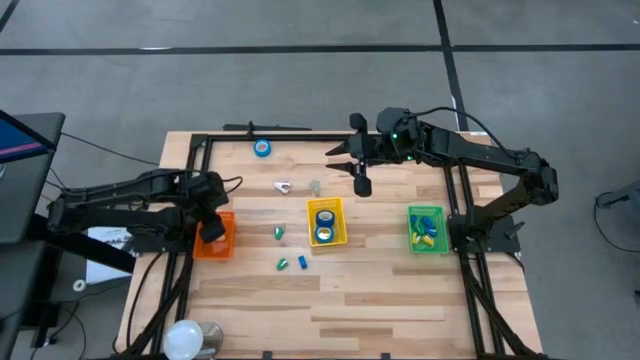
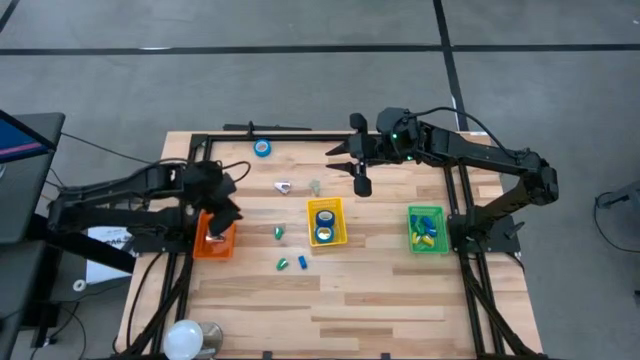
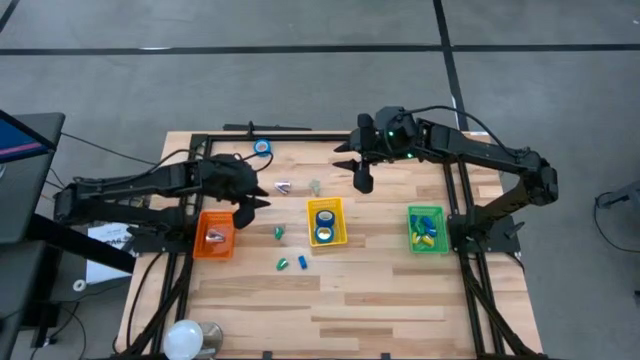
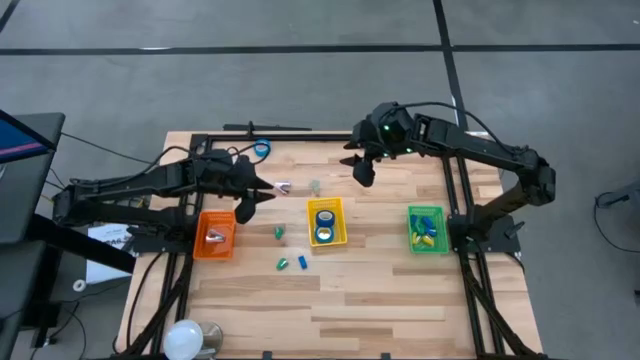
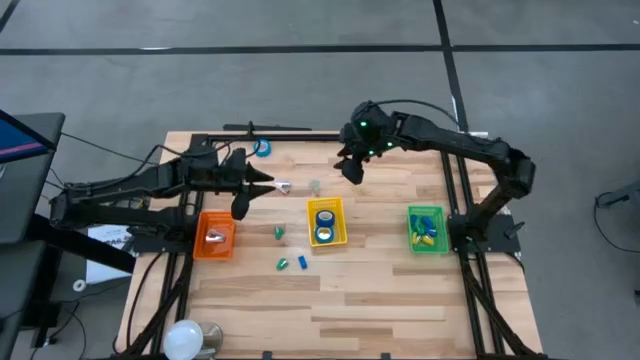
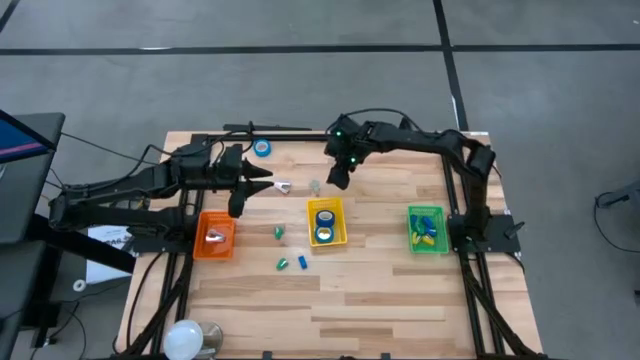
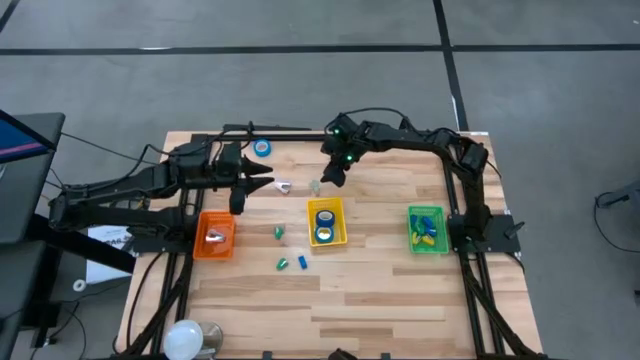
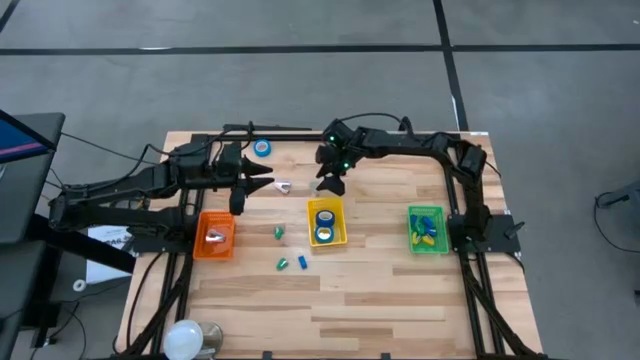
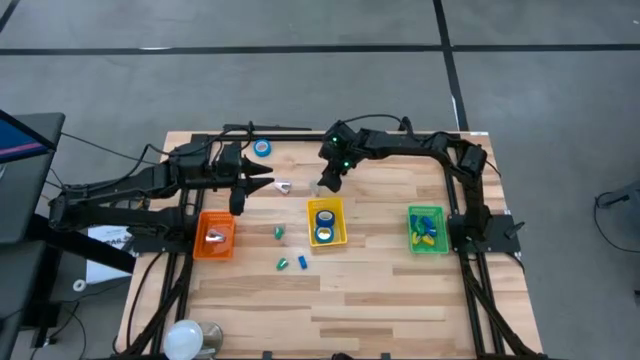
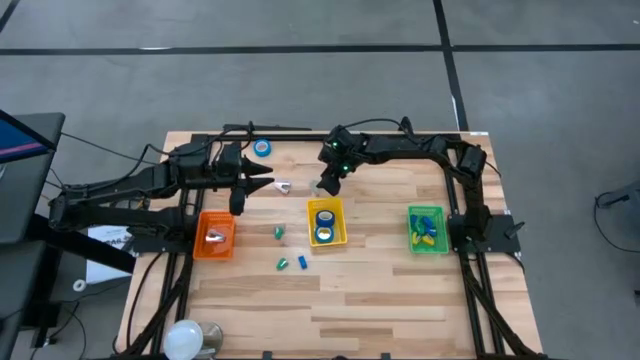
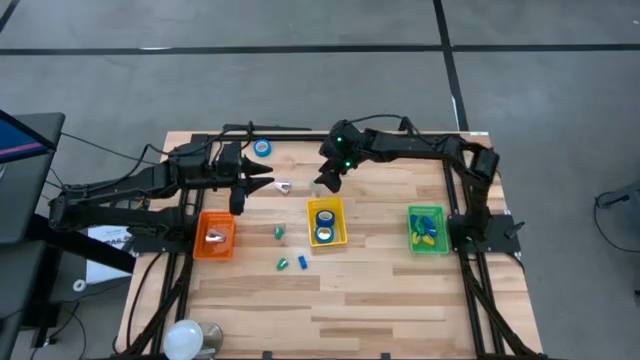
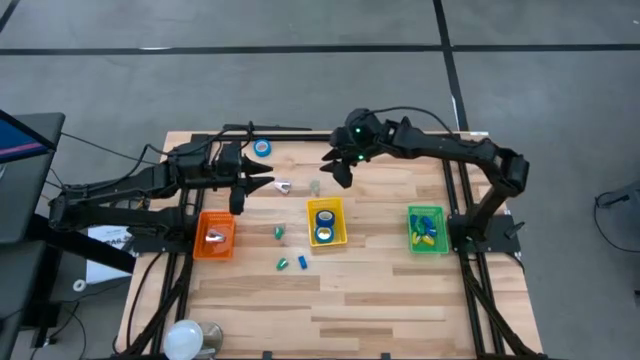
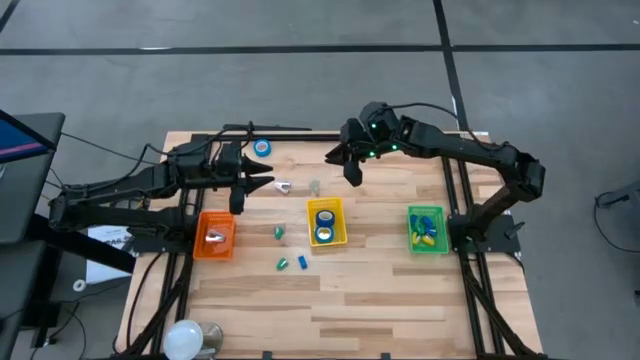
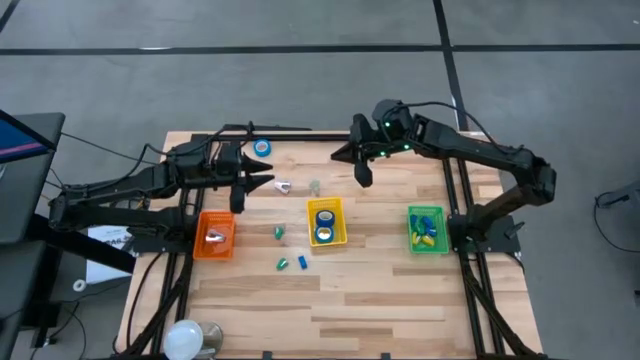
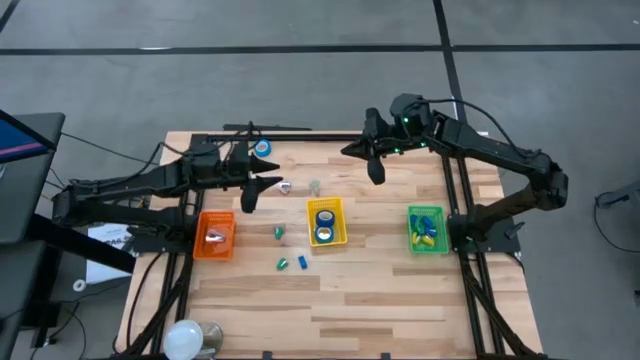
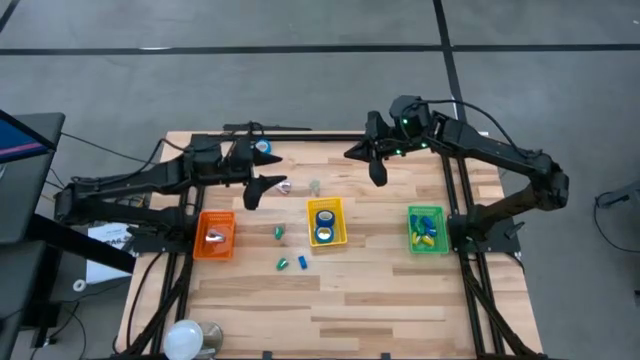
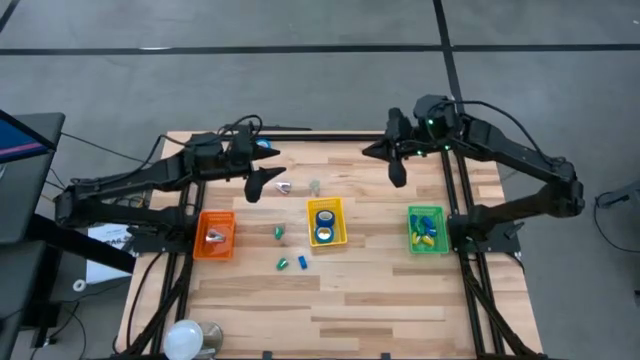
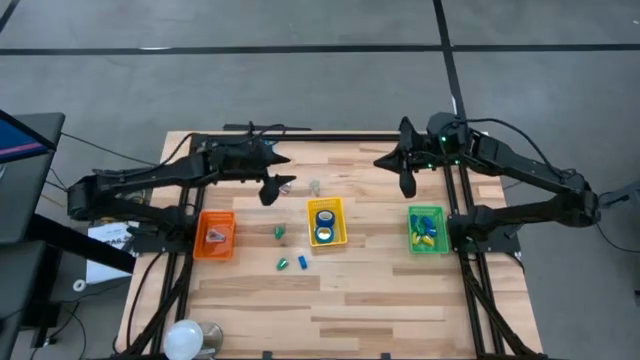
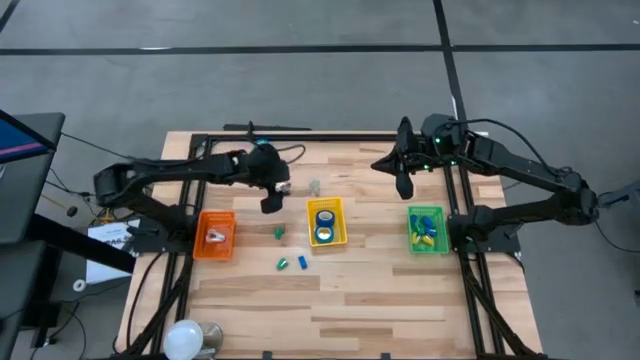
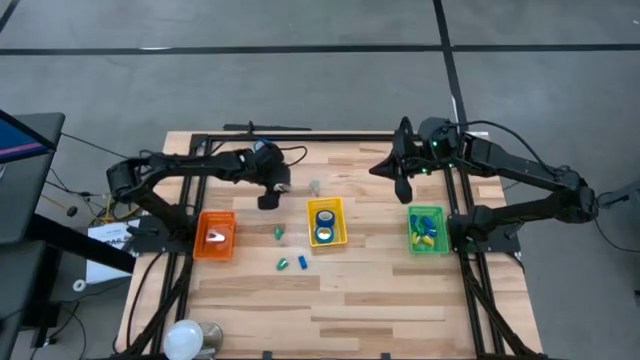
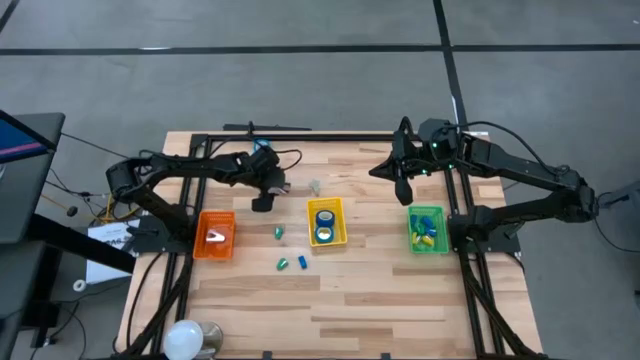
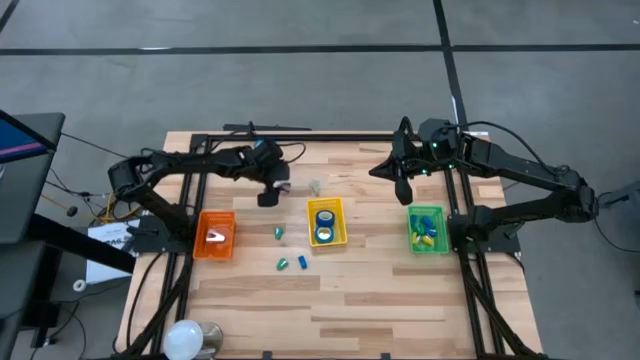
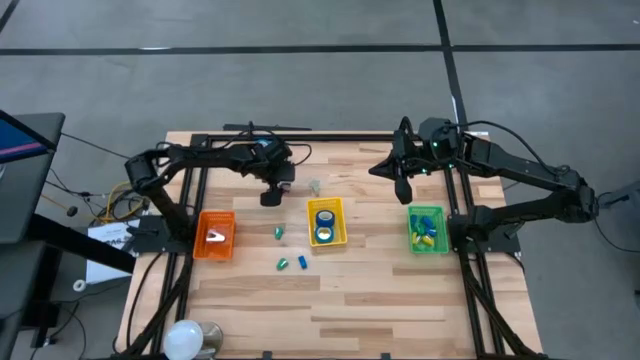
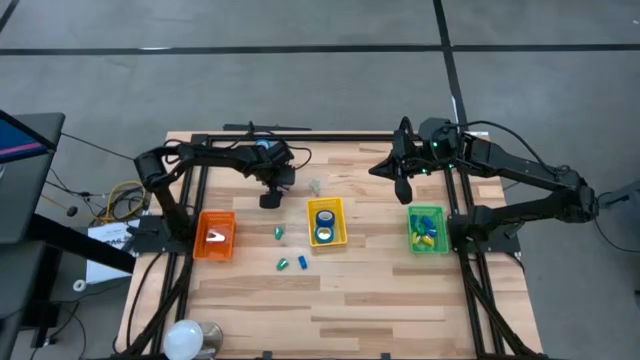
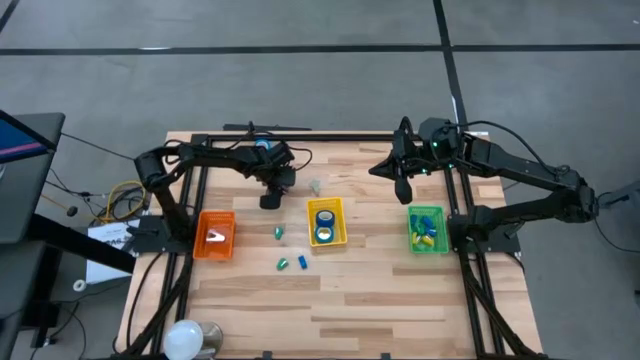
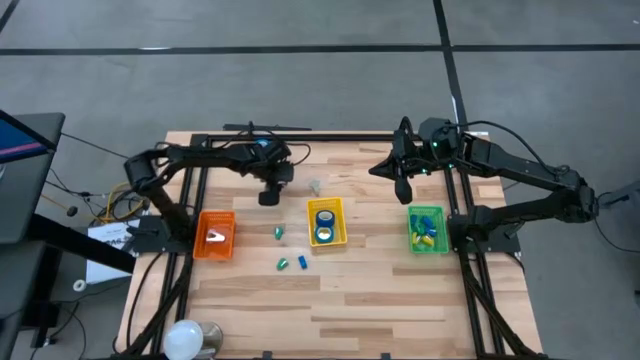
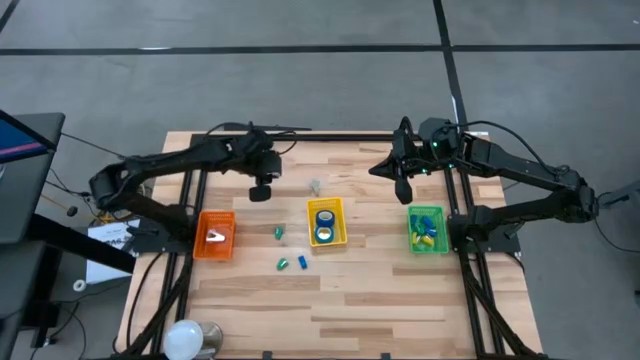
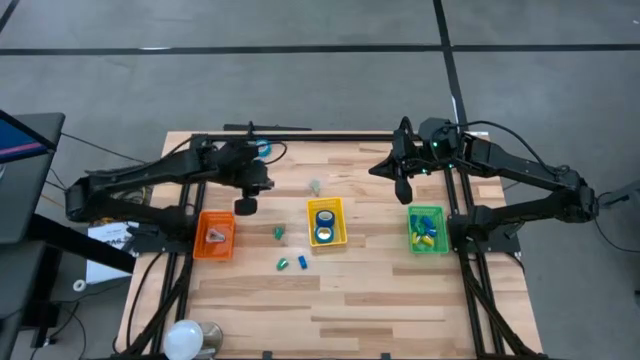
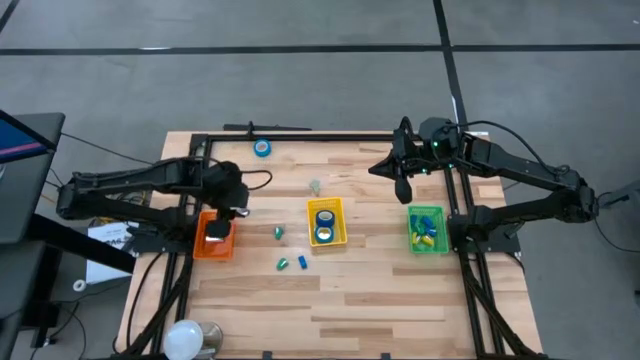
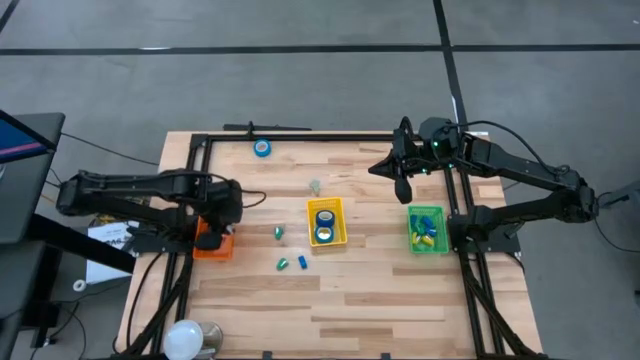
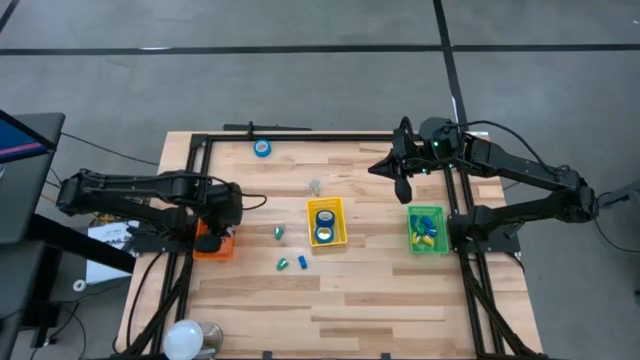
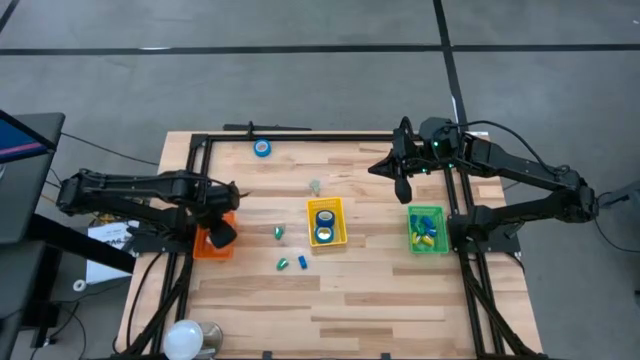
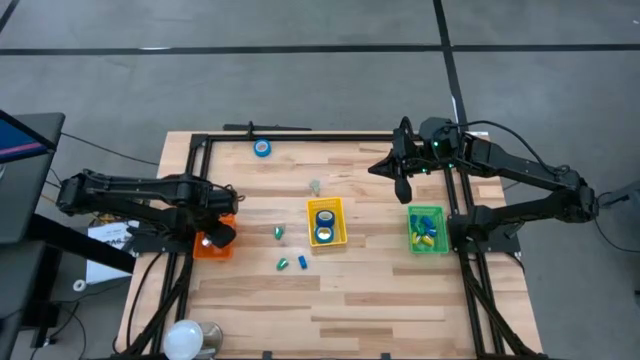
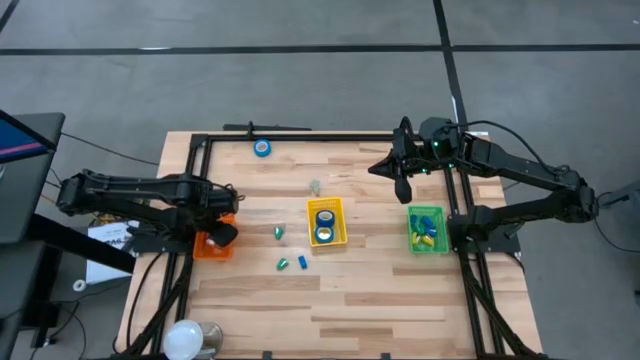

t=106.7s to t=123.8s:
Task: Pick and place Stapler, Stapler remover, tape
Put the purple staple remover into the orange basket

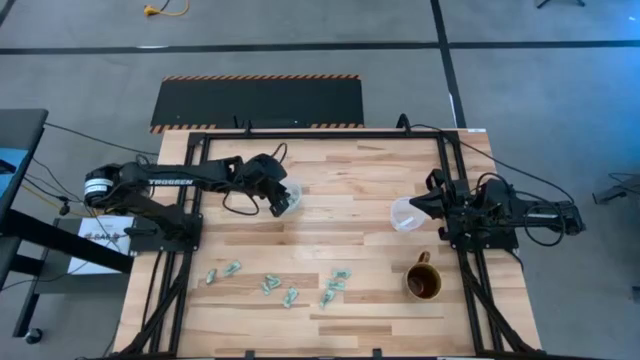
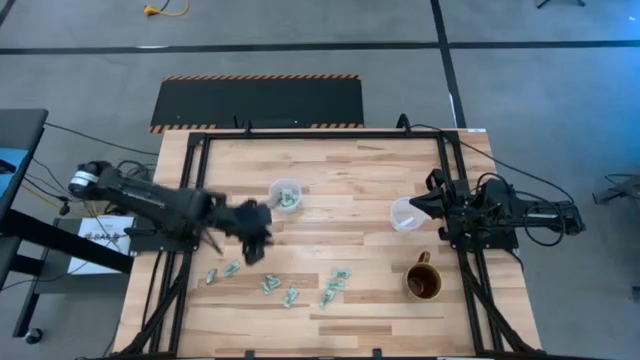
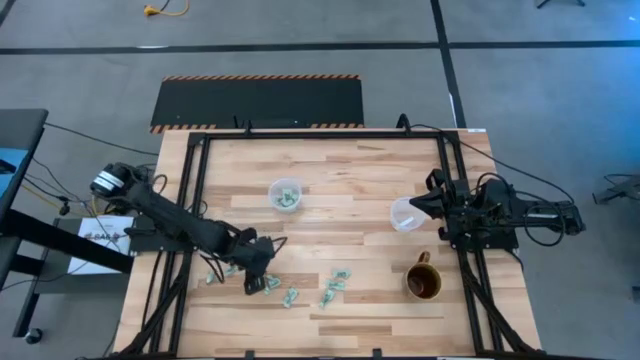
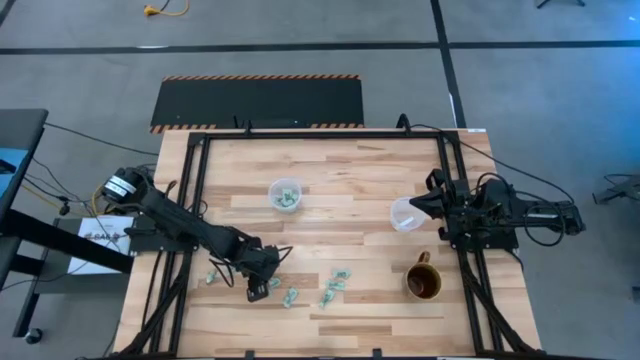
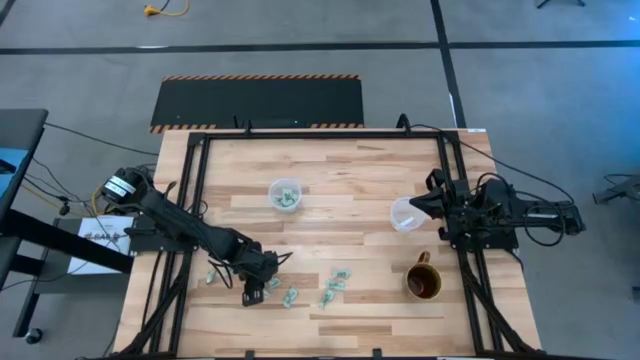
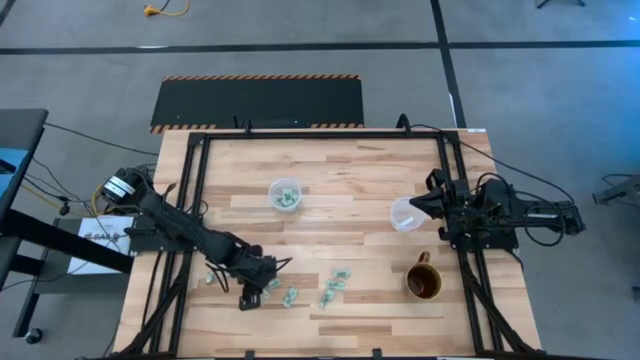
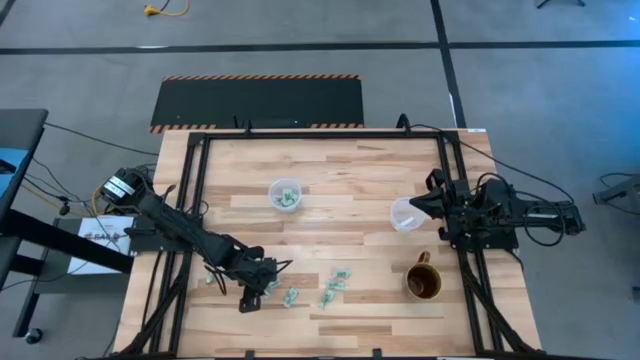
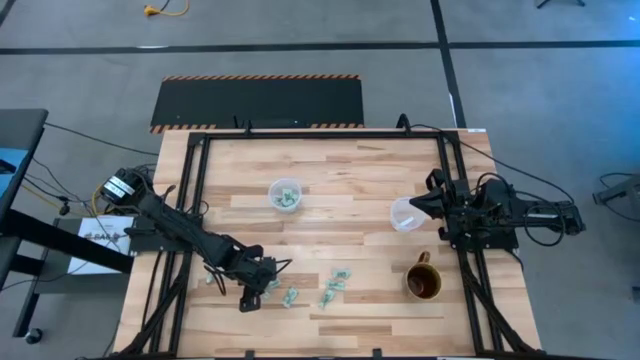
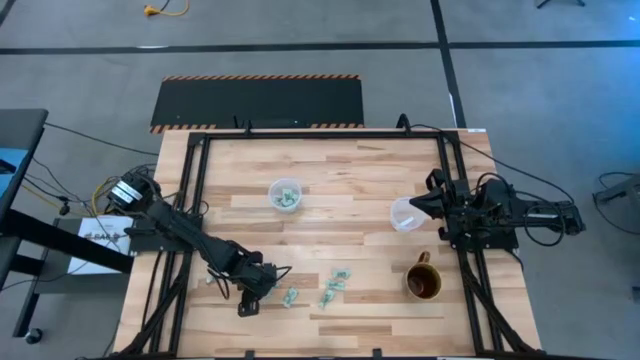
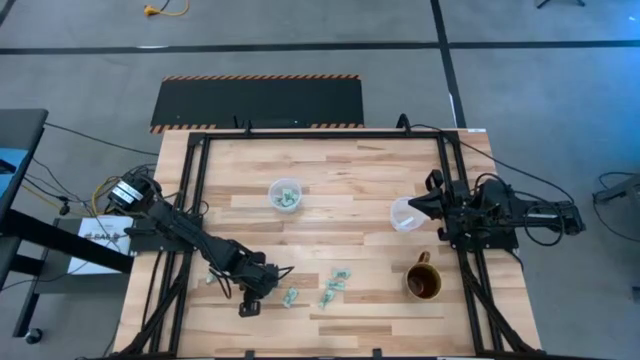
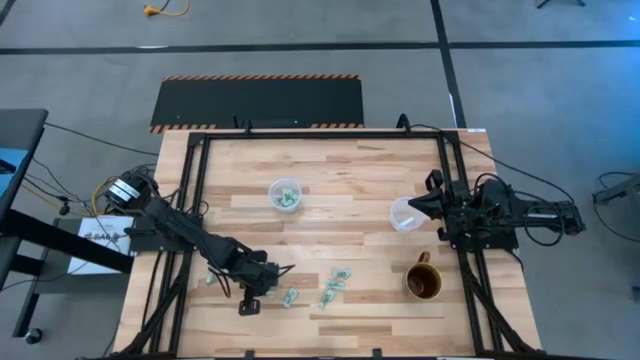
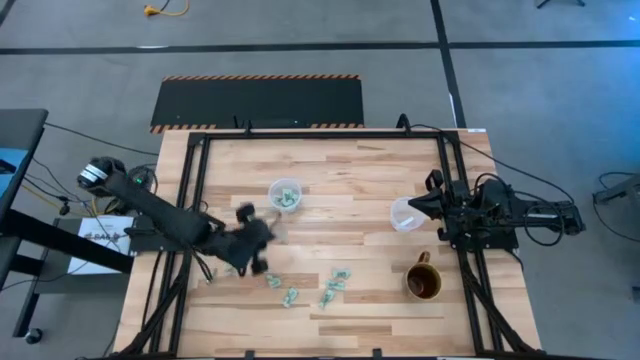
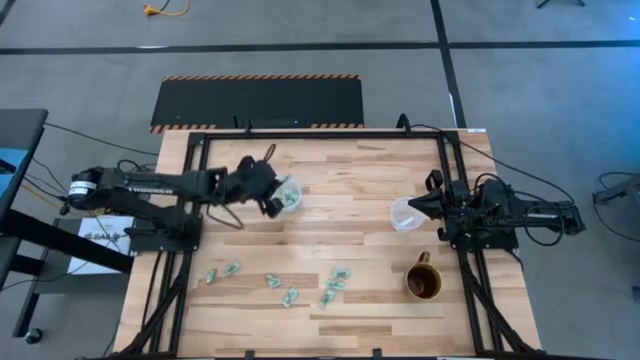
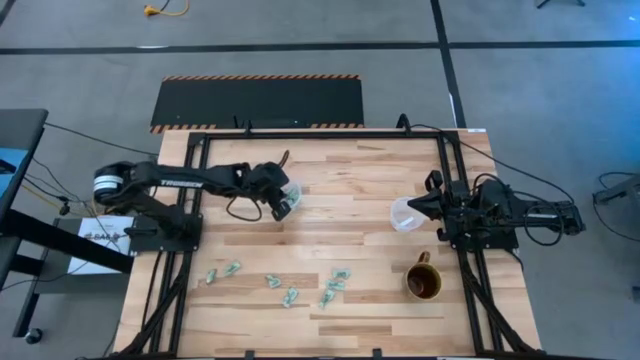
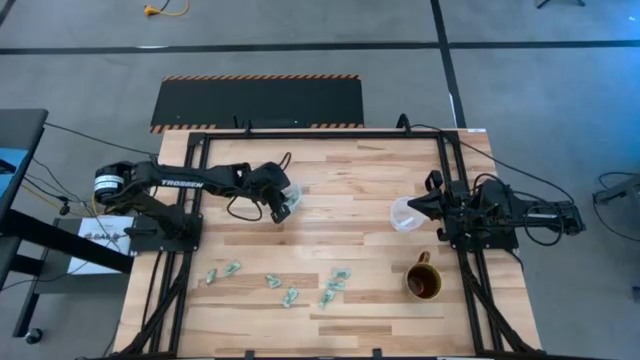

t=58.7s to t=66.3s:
Task: Pick and place Stevia / Truvia into bins
Put the white stevia packet into the left transparent container
